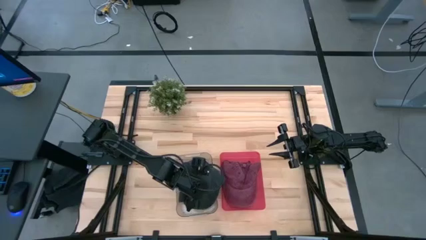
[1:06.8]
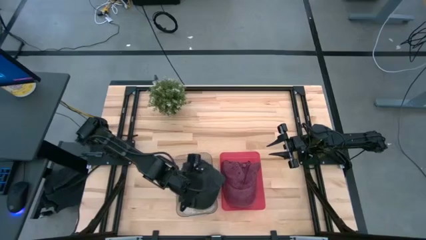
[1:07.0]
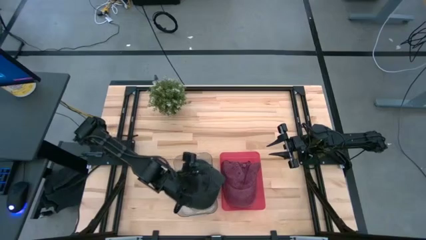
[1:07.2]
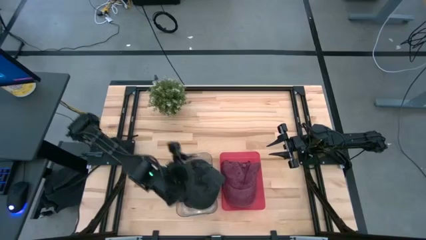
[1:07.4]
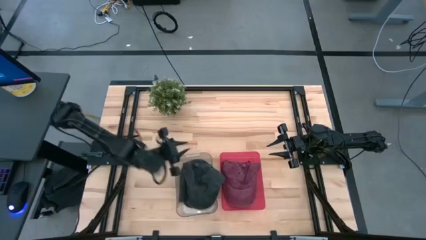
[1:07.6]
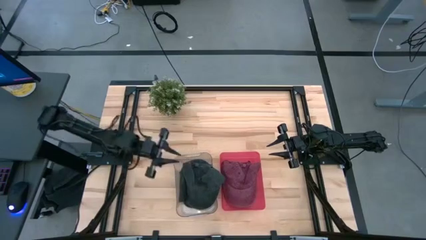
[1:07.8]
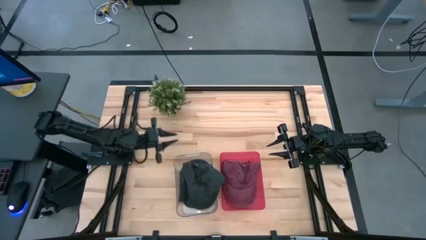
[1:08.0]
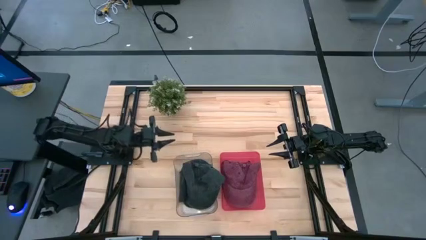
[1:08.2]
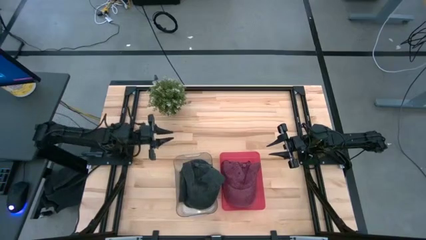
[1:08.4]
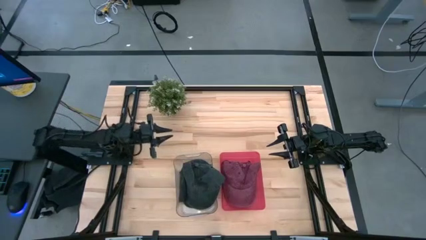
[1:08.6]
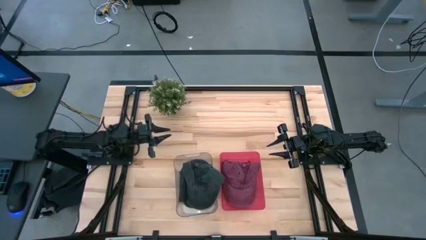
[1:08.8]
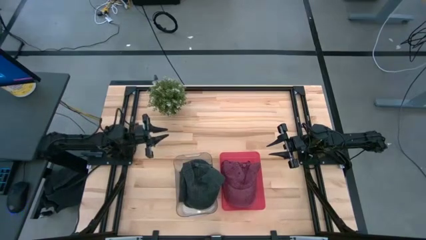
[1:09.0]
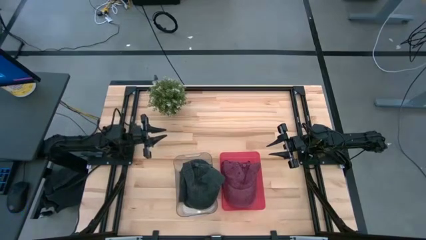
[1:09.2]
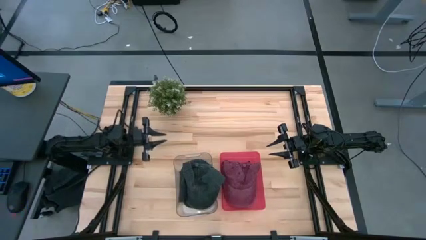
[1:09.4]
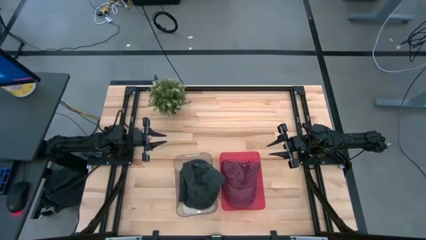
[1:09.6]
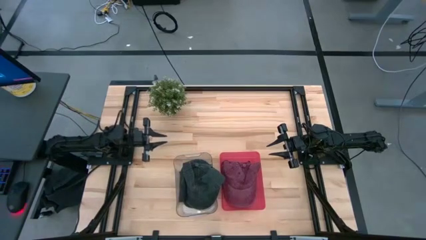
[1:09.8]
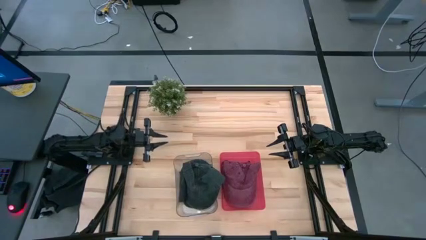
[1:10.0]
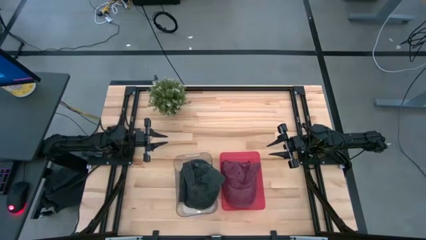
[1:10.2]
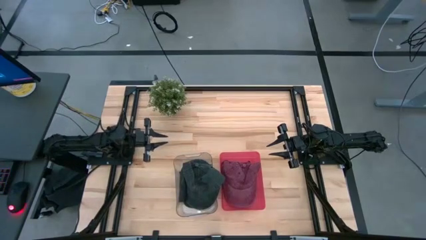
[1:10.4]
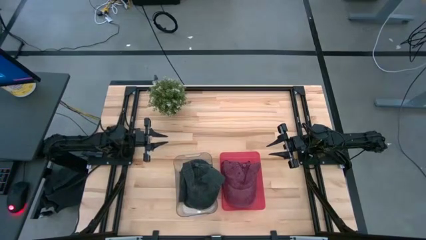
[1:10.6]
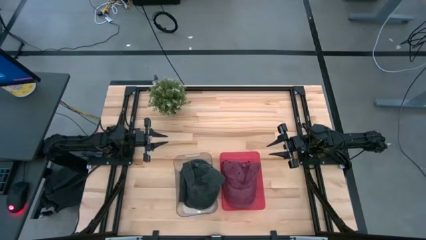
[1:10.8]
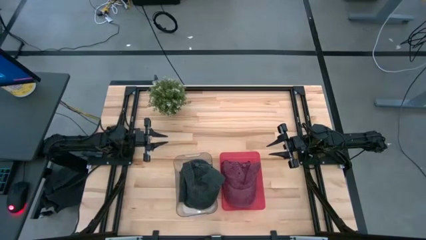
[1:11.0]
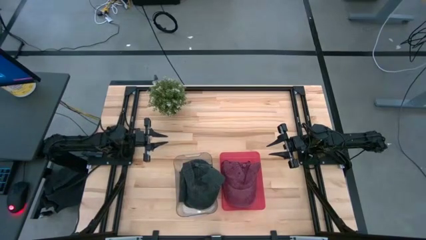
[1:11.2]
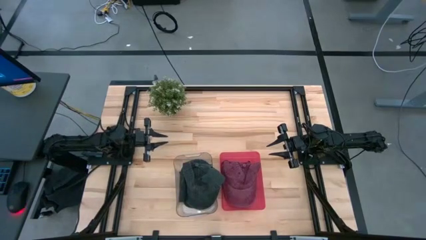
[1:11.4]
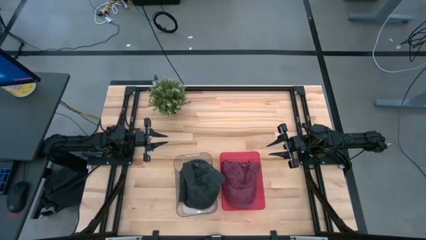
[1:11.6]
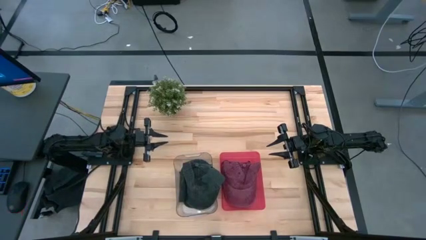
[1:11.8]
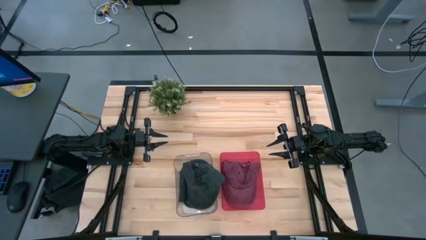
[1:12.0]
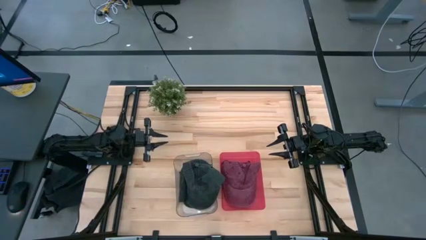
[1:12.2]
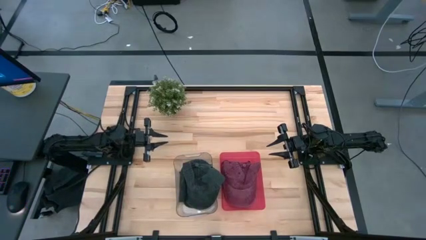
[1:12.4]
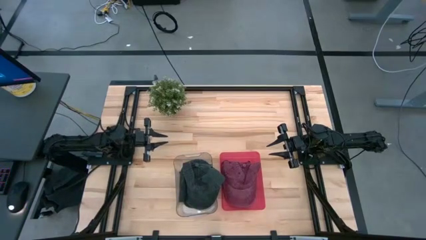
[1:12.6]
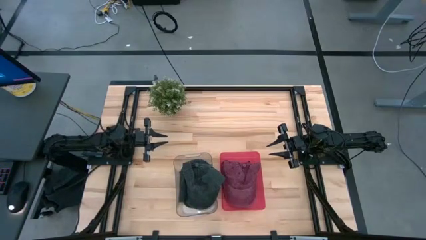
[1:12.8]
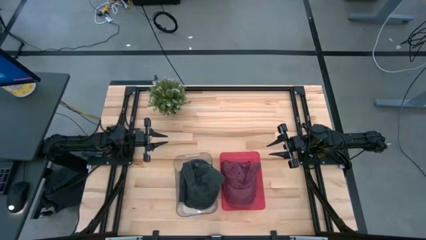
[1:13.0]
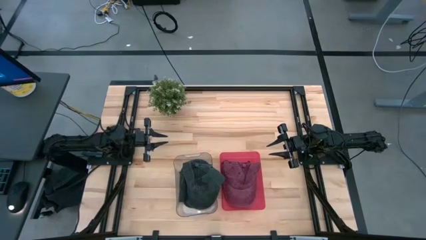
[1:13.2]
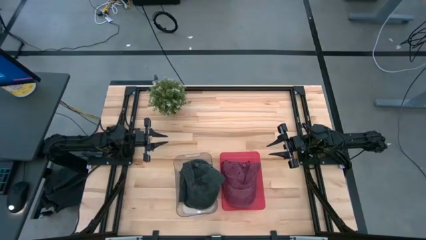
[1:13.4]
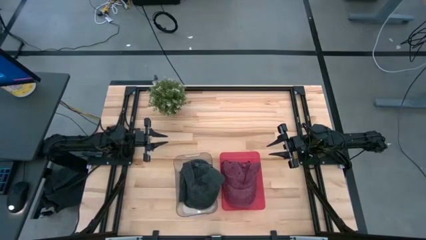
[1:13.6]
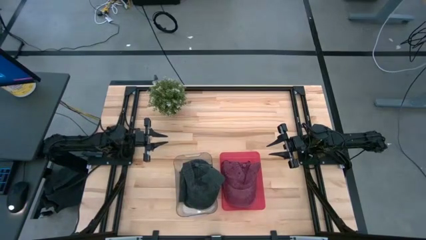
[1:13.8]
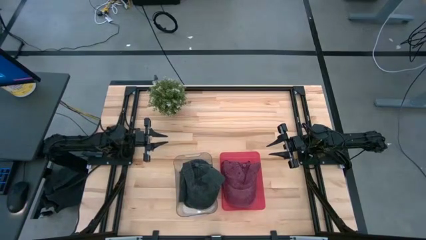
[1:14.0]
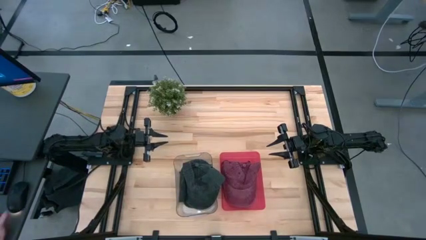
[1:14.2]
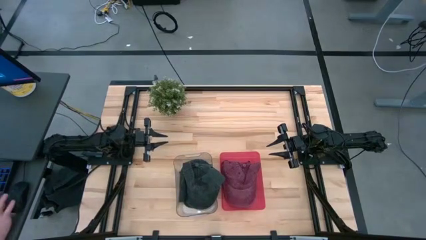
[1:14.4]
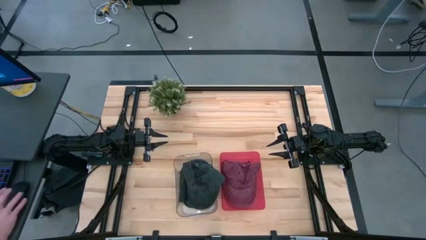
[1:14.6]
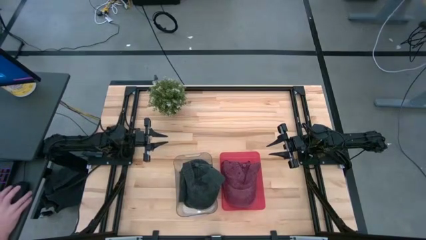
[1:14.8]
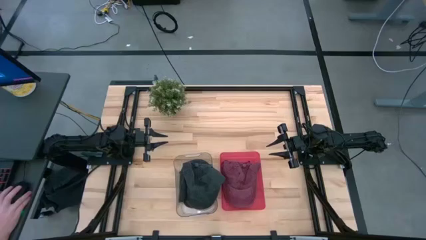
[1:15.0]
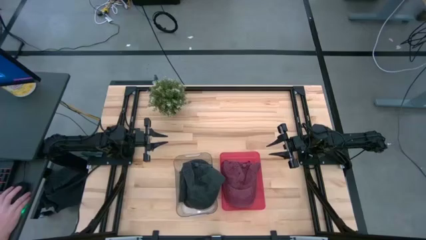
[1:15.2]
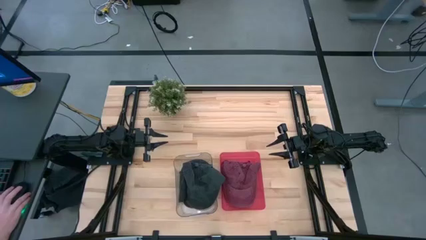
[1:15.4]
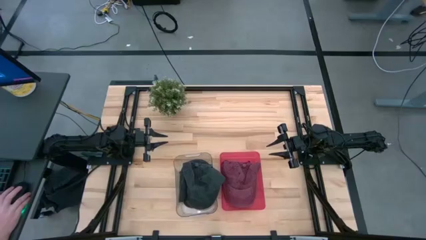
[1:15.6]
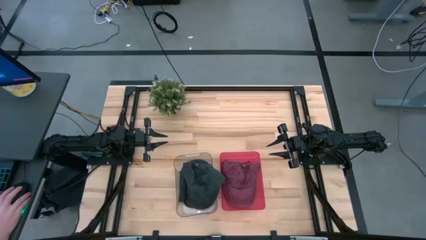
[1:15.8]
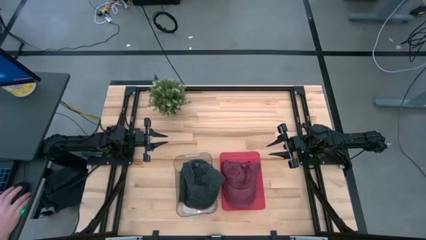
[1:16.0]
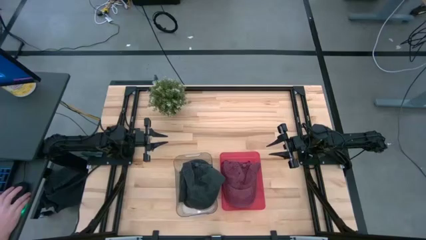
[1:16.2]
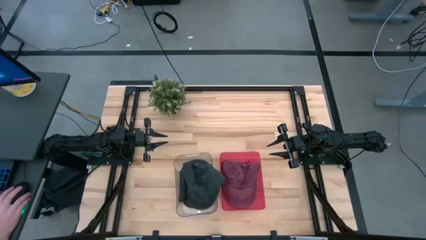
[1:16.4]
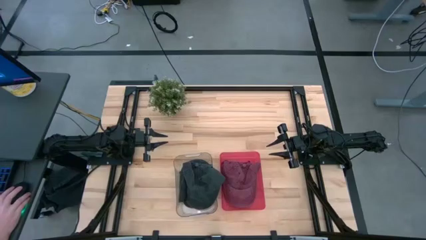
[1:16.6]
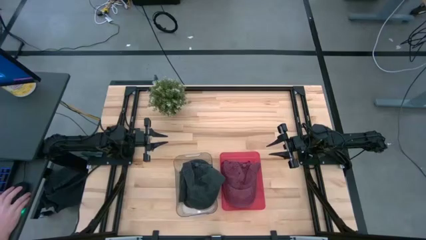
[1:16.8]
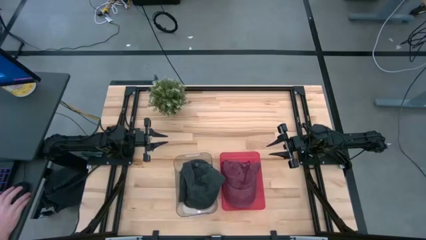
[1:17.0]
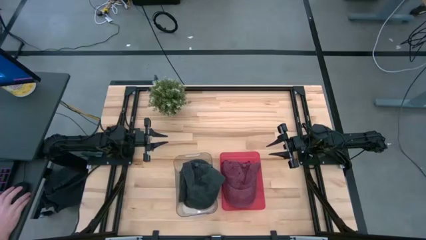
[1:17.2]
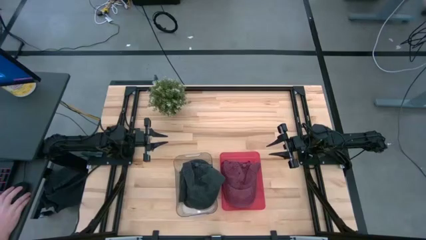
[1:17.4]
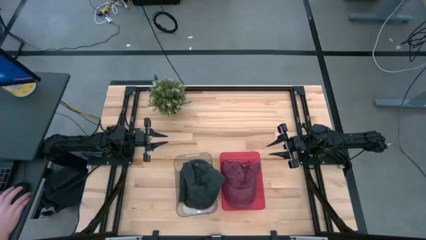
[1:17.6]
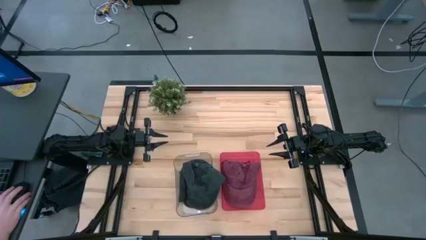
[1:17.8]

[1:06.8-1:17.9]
Task: Pick & Place hat
Return to Home Position
